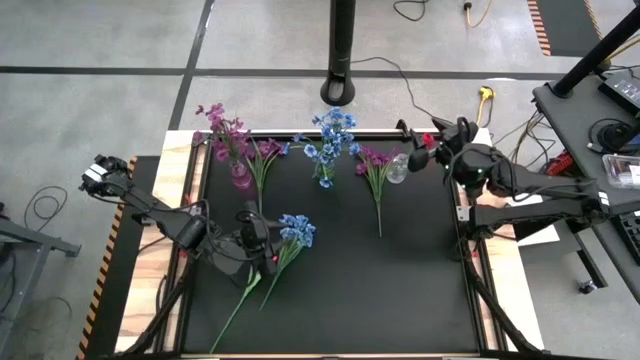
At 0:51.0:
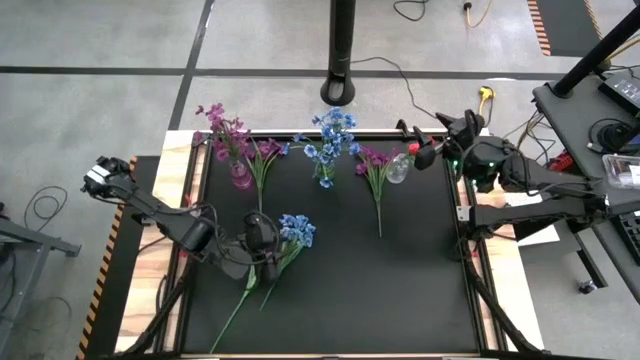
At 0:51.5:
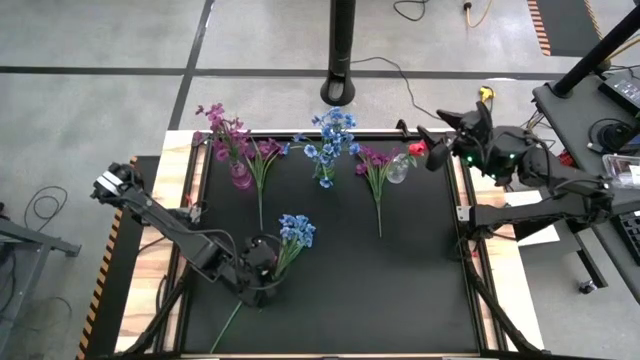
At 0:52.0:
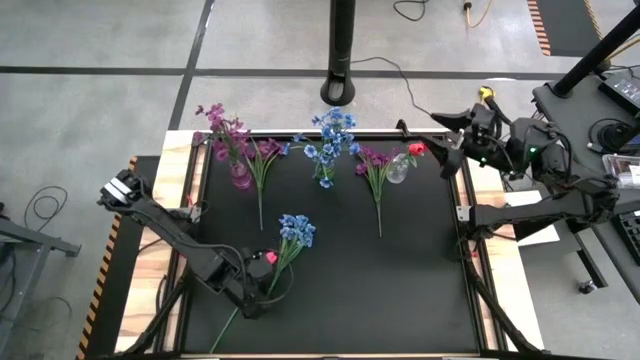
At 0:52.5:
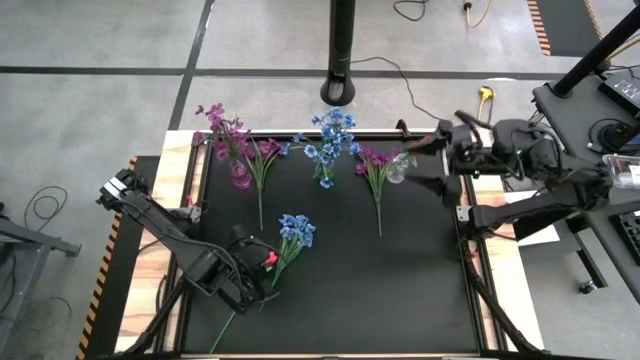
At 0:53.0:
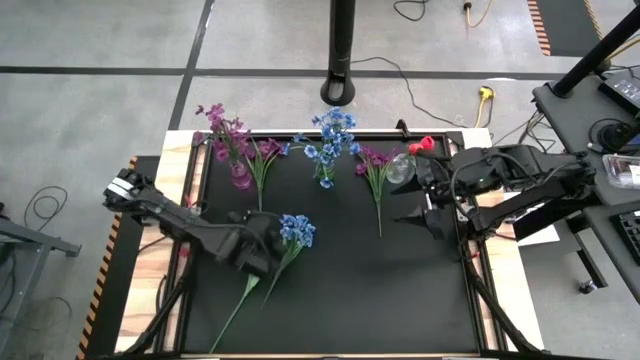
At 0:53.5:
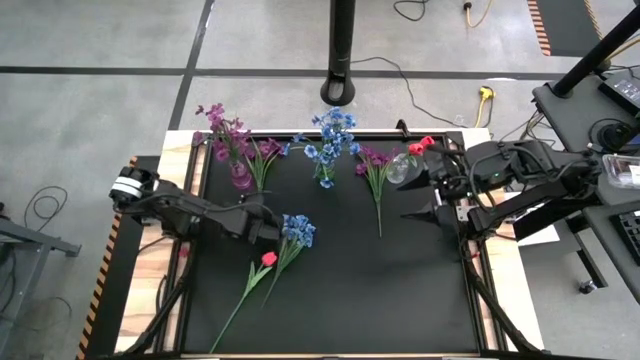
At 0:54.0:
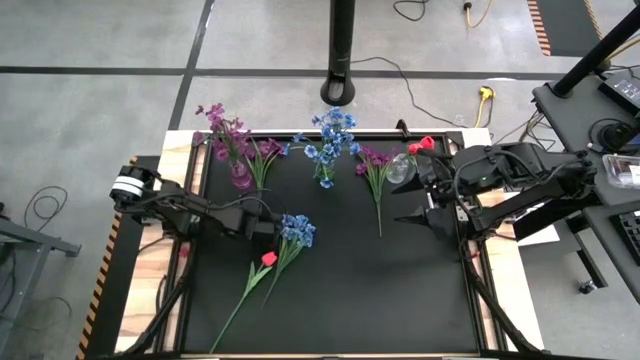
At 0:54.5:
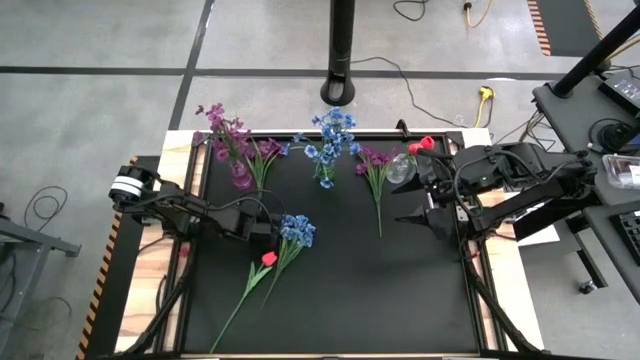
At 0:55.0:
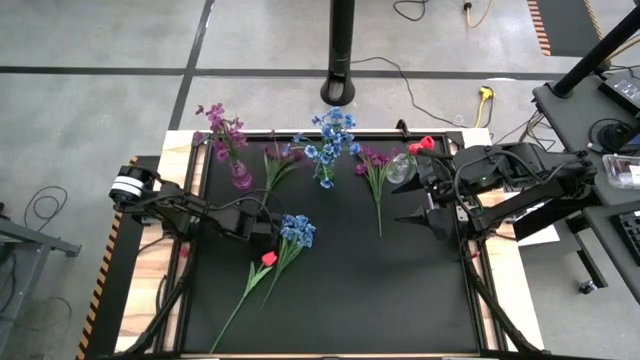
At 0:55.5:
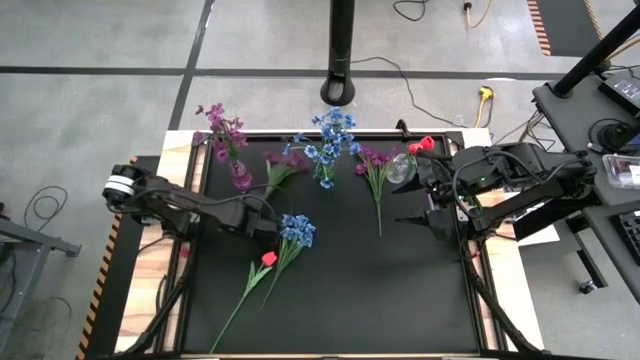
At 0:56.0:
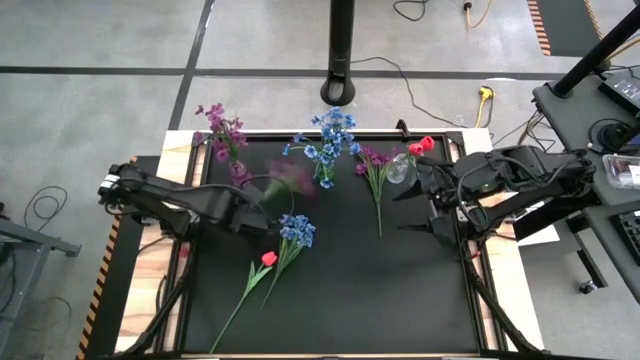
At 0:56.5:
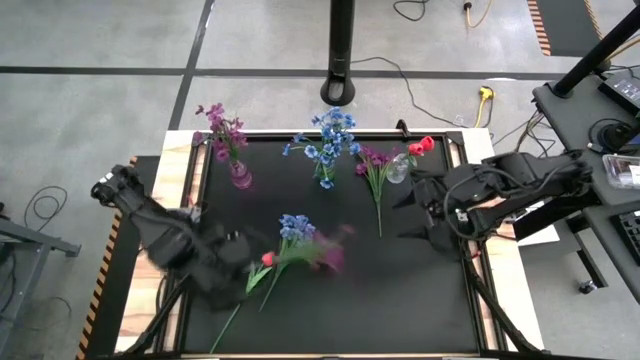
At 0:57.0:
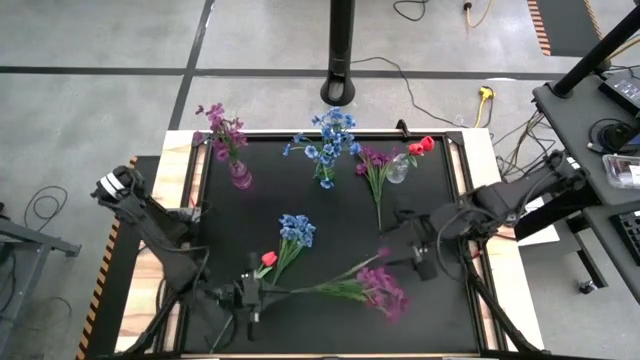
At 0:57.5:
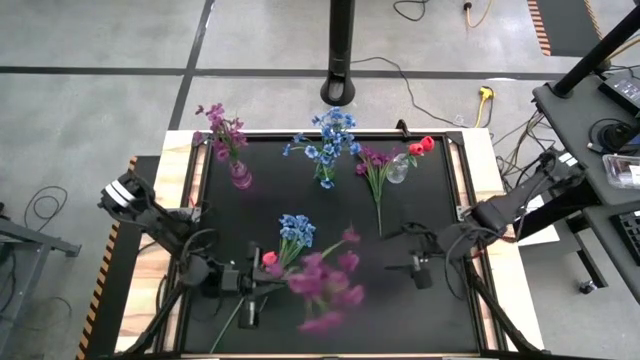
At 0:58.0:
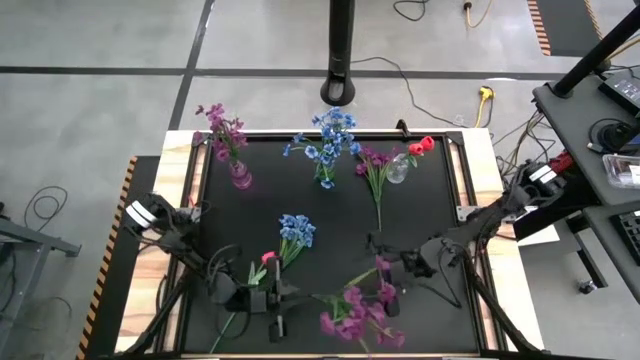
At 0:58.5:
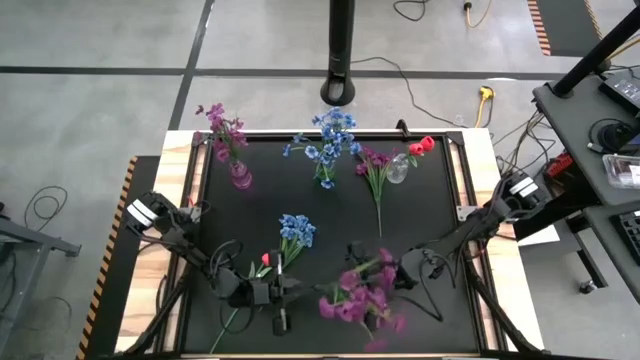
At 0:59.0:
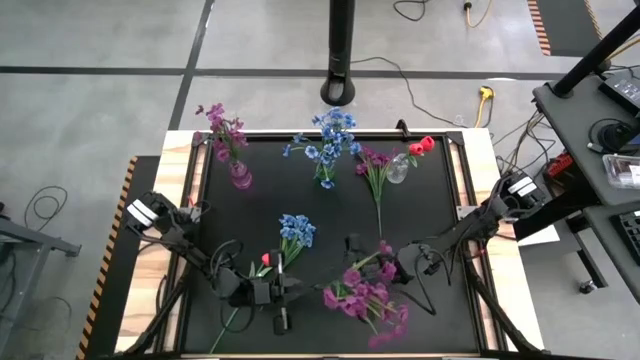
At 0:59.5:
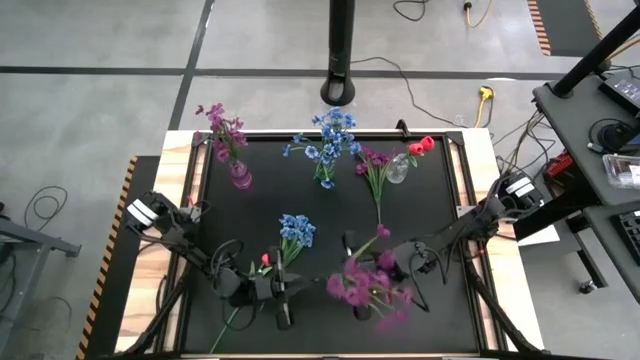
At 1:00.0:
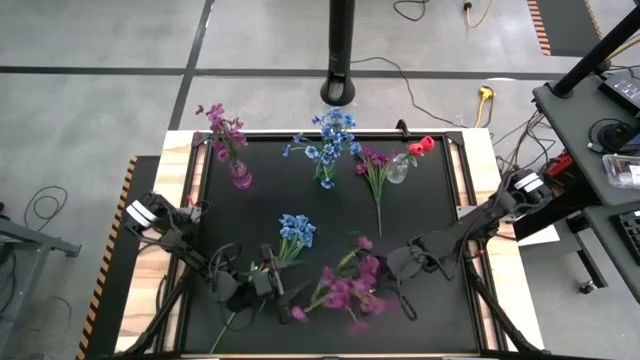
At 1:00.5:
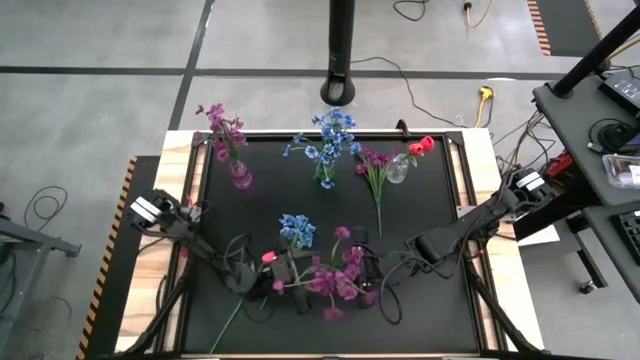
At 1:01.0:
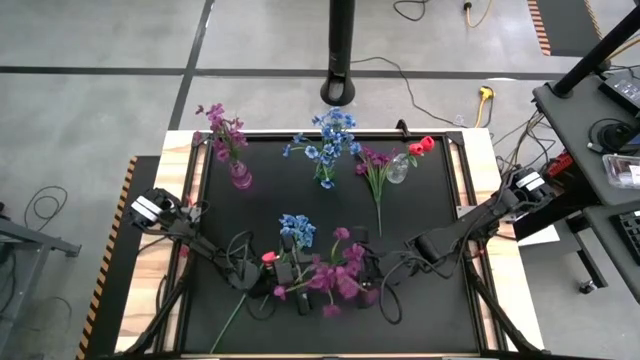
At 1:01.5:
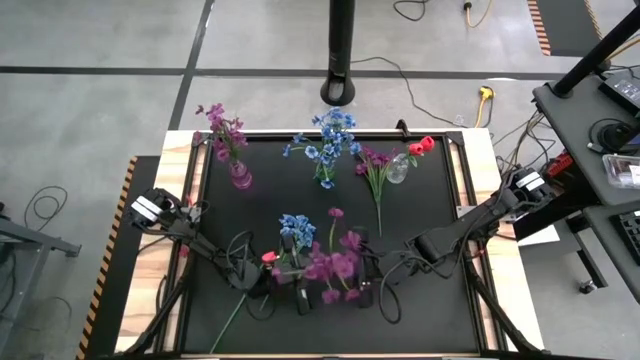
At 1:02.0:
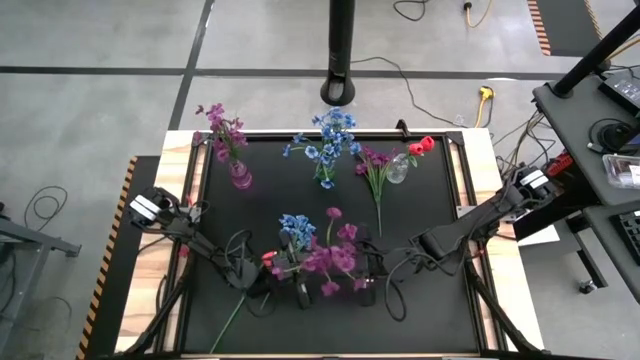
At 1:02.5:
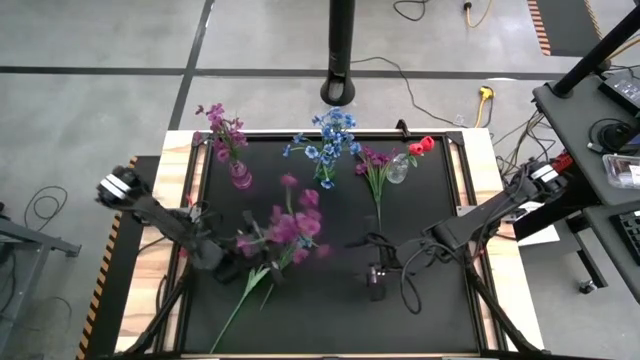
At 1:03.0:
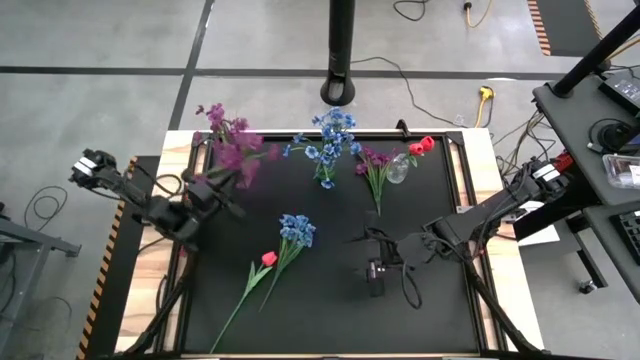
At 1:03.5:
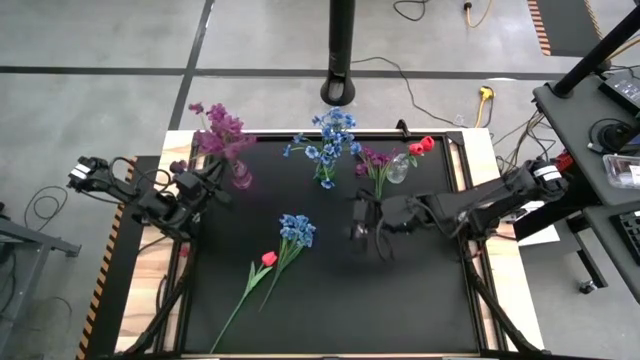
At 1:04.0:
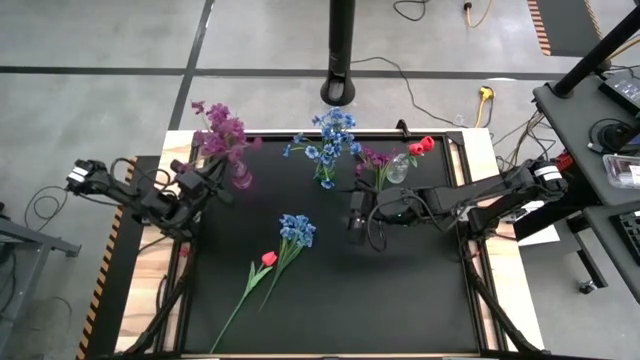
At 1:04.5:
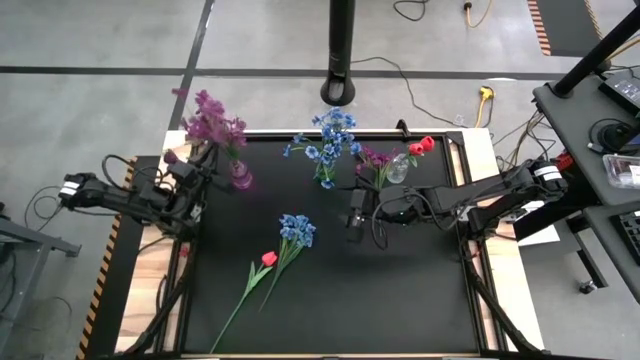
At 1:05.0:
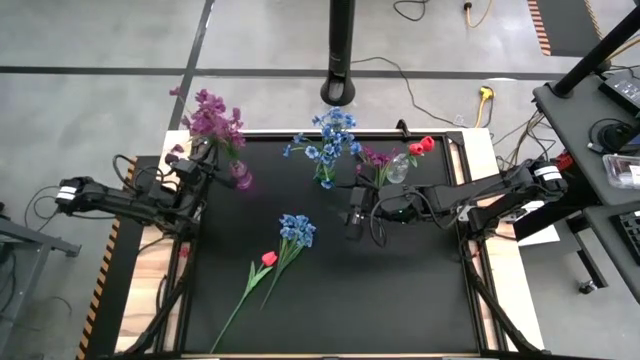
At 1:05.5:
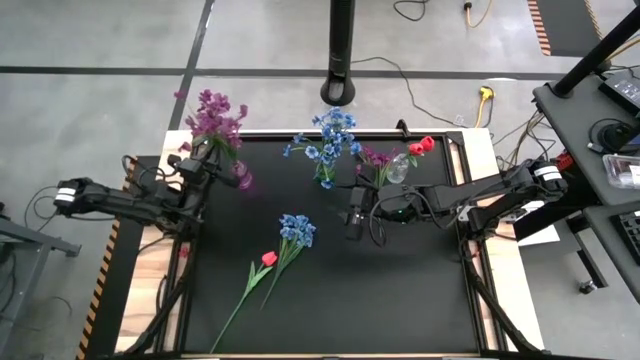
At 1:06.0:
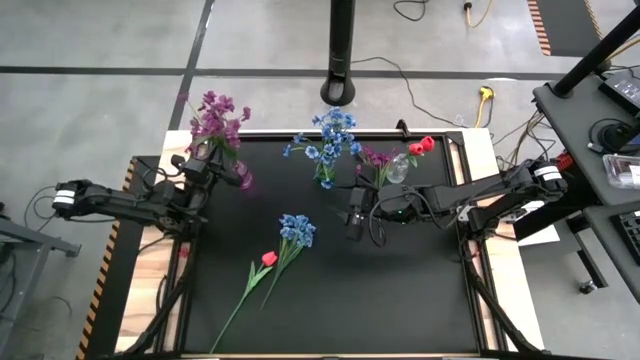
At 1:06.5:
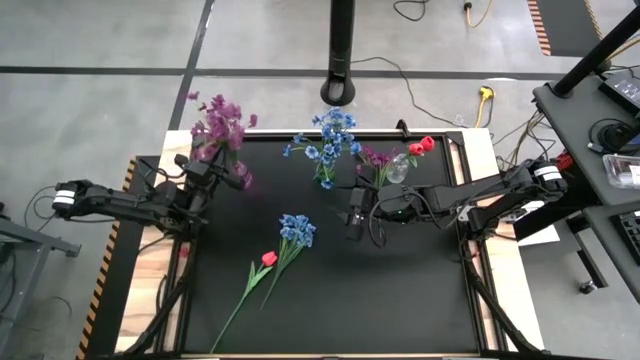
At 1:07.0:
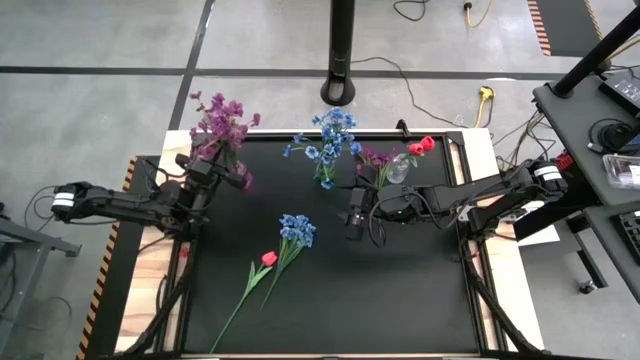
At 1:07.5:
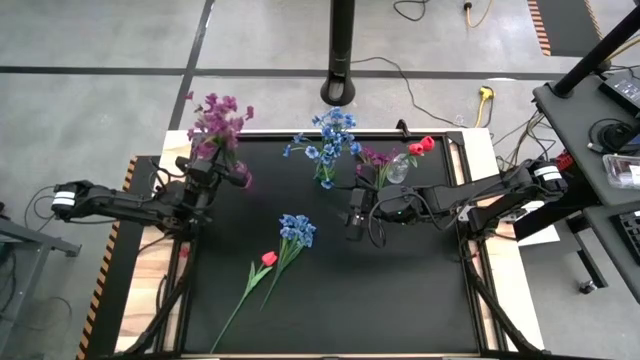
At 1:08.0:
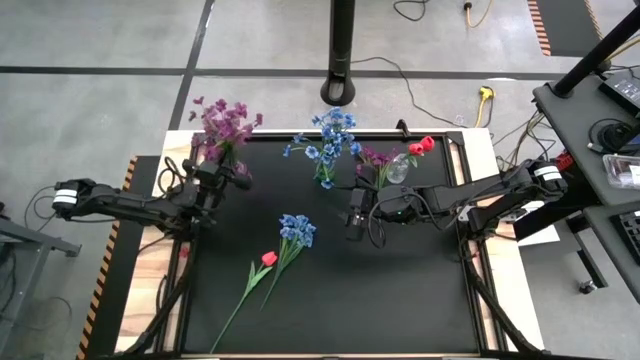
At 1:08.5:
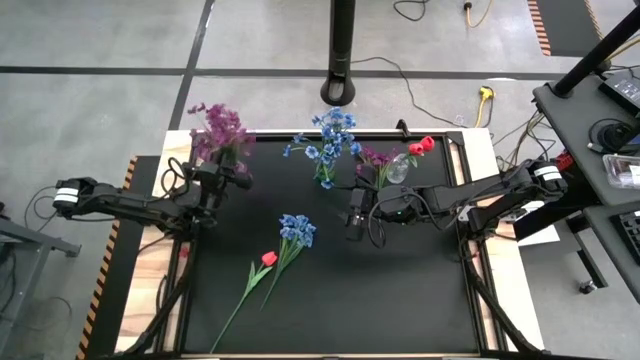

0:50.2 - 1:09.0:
Task: Sort flowers into vase by color
Put the left violet flowers into the violet vase

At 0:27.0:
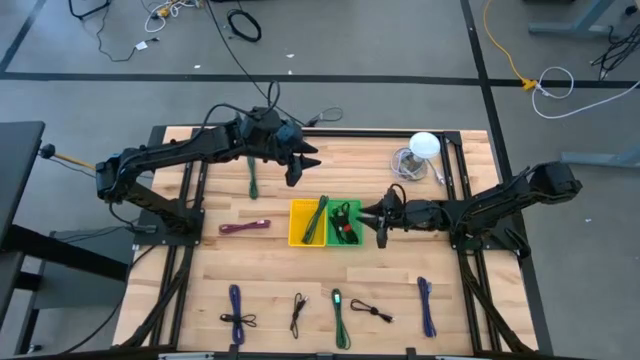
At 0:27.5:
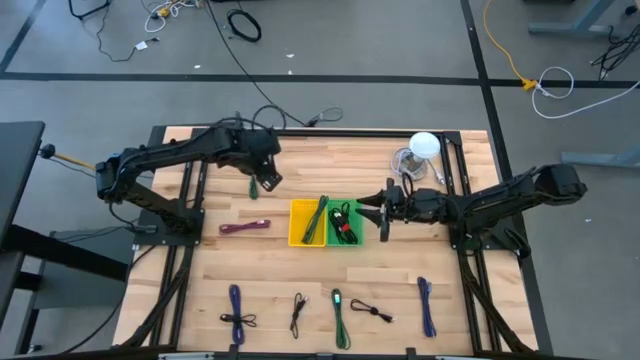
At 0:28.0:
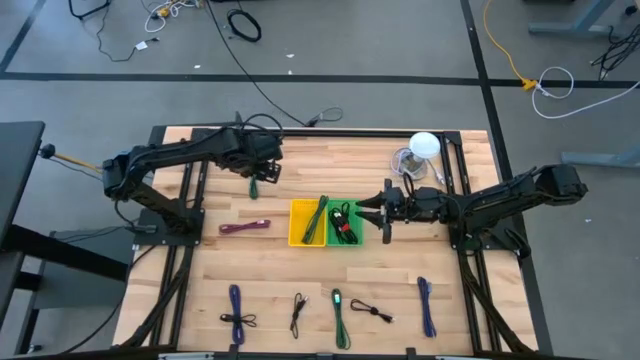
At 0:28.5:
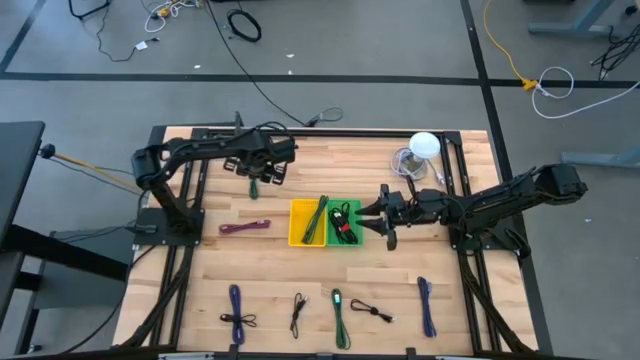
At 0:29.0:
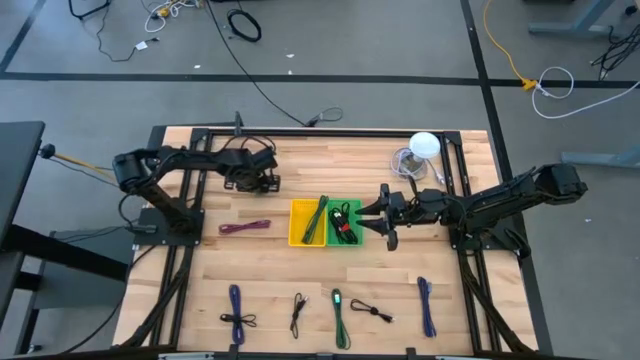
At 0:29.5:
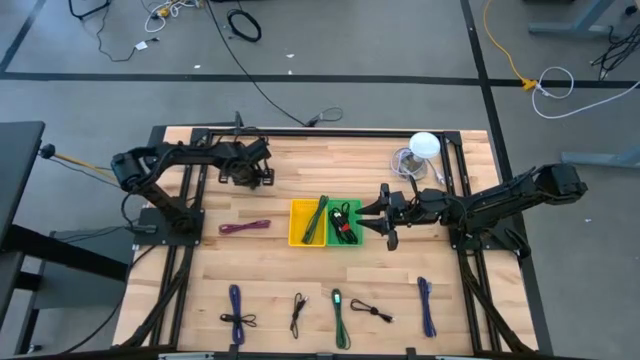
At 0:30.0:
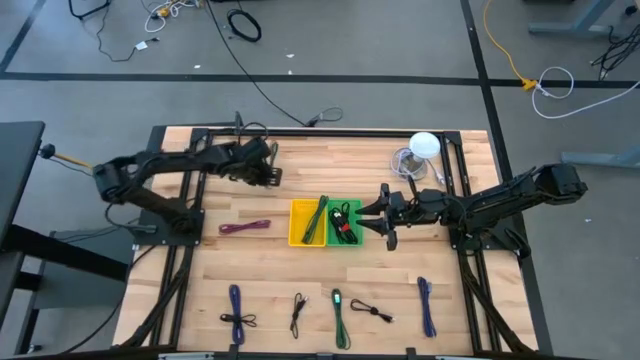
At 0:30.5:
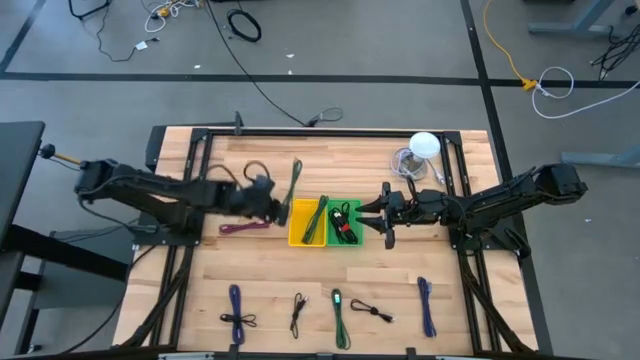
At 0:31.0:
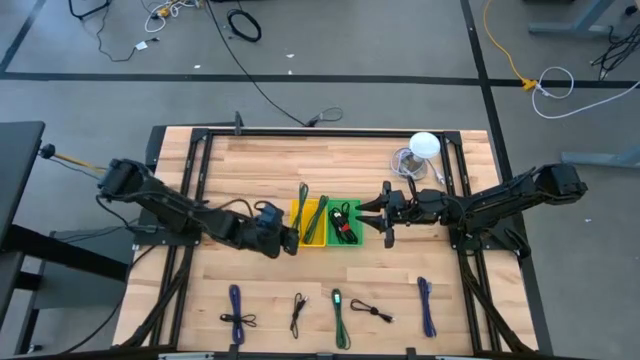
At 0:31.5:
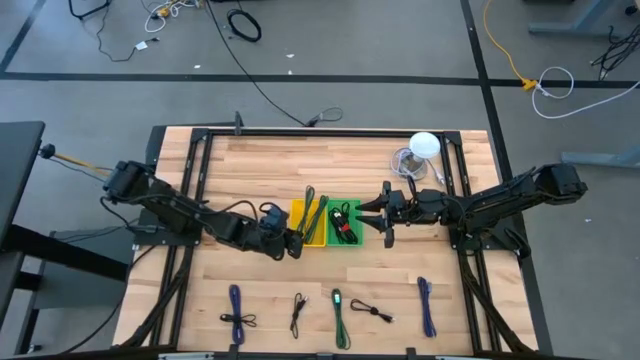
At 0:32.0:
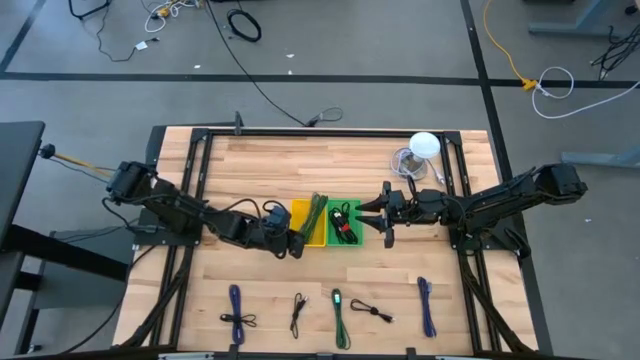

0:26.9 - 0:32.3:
Task: Pick & Place USB Port
Put the green charger cable into the yellow basket
